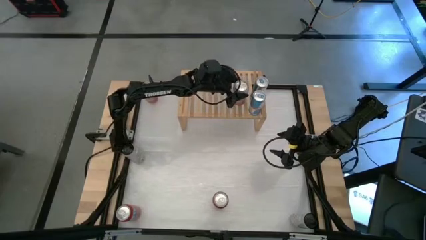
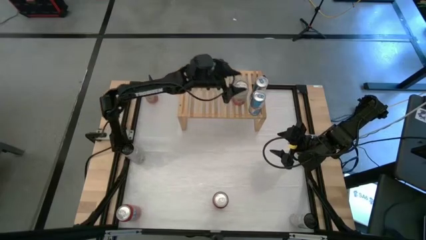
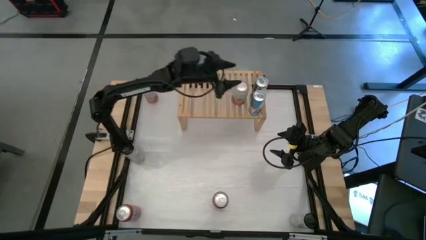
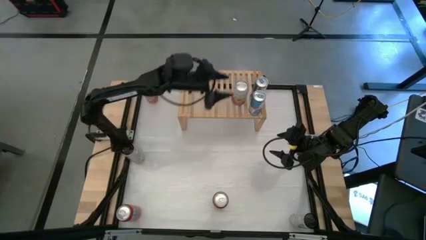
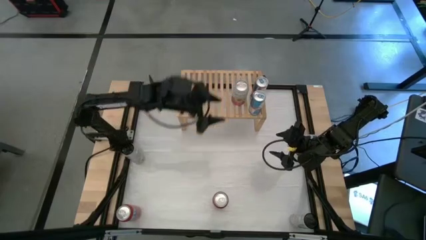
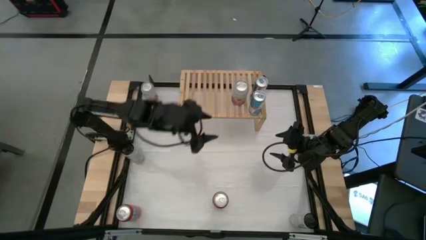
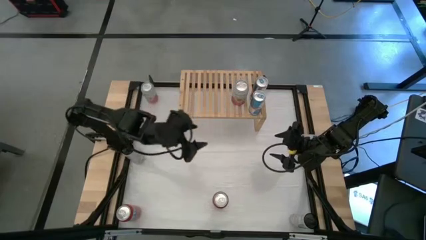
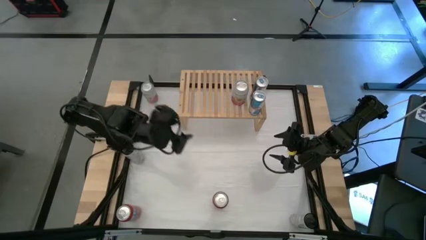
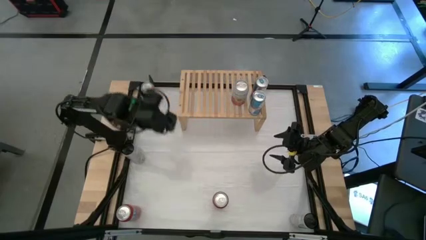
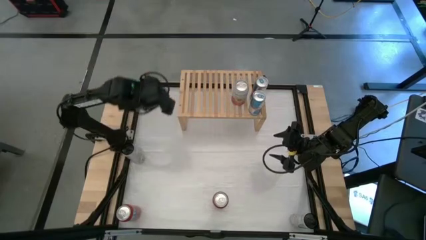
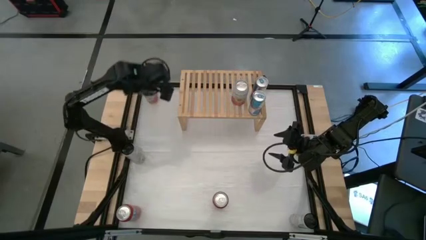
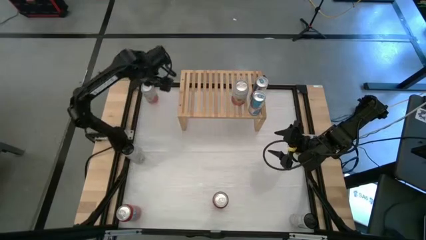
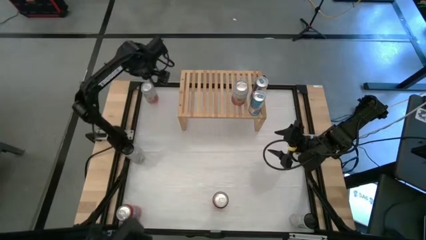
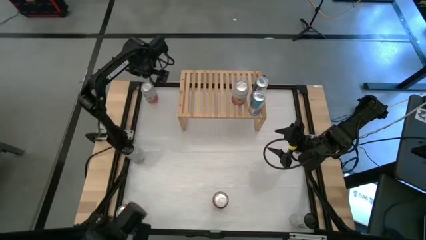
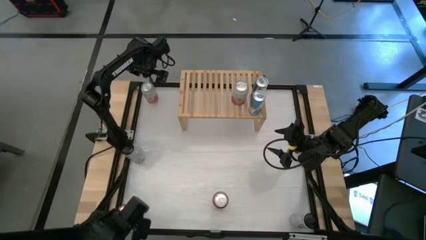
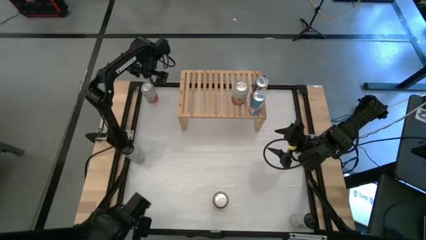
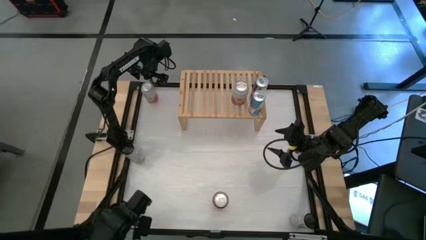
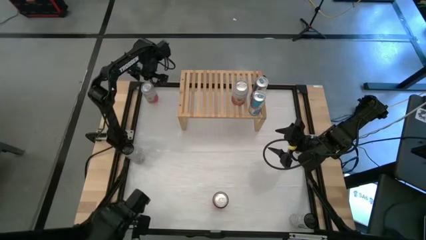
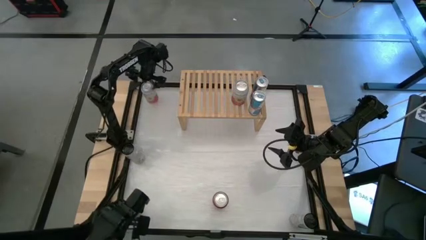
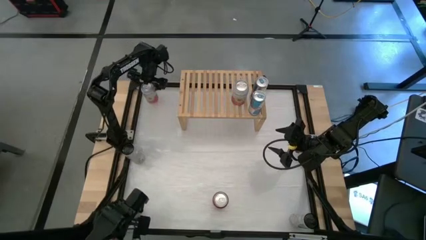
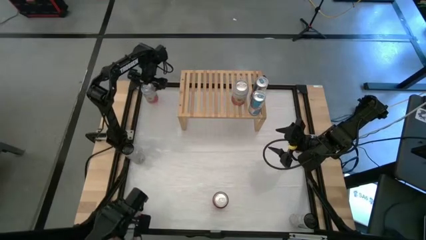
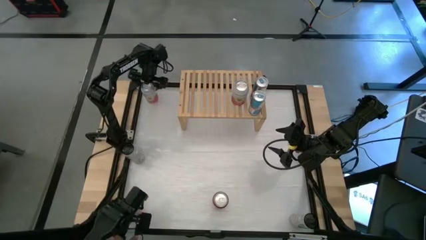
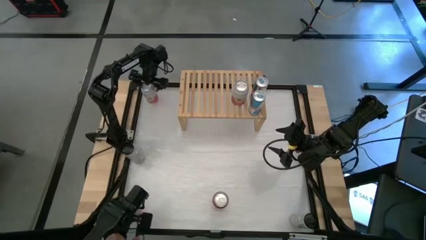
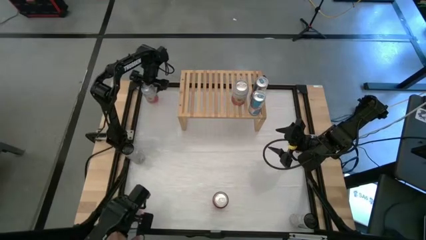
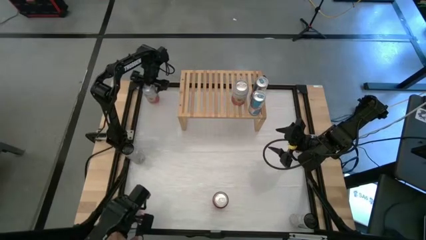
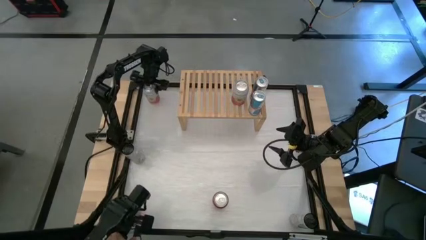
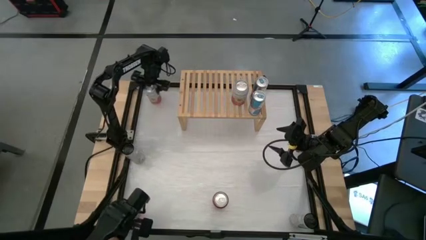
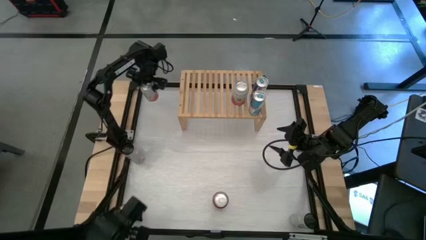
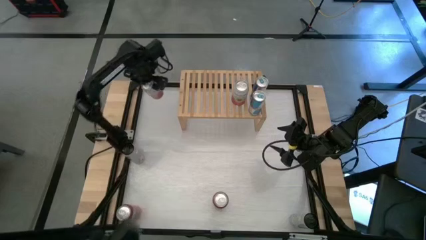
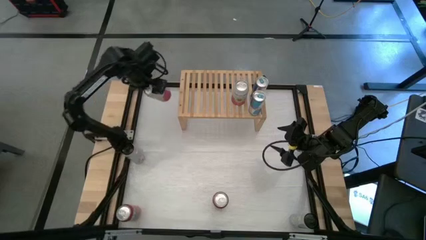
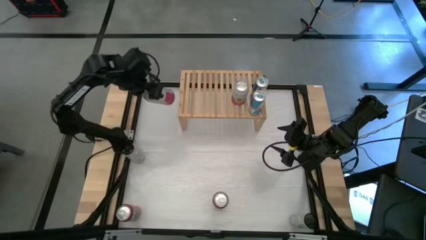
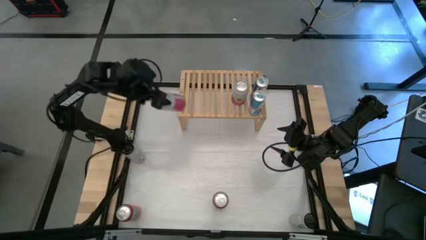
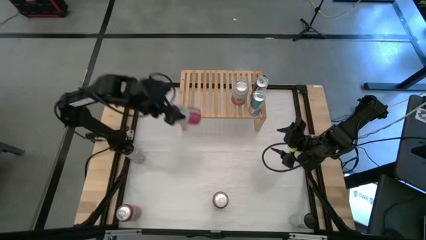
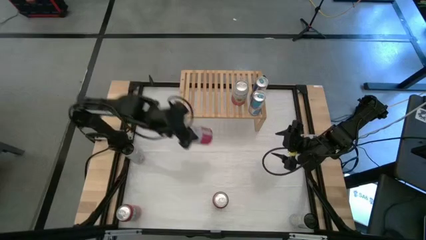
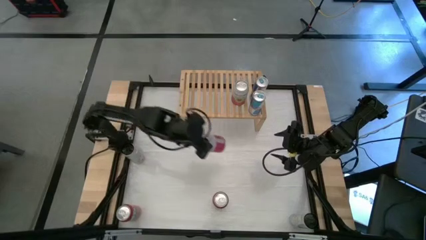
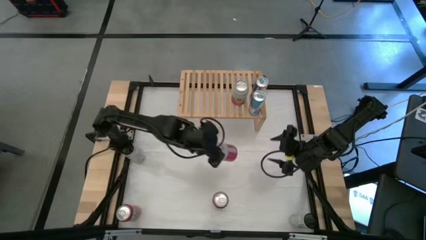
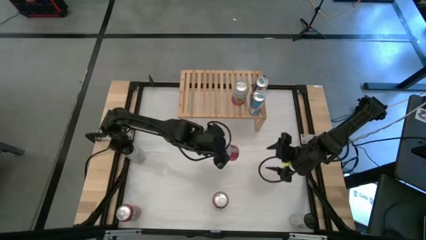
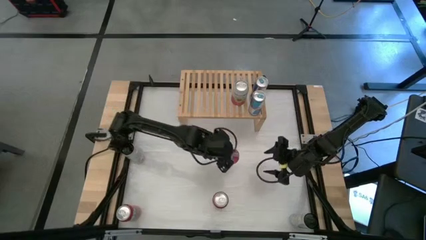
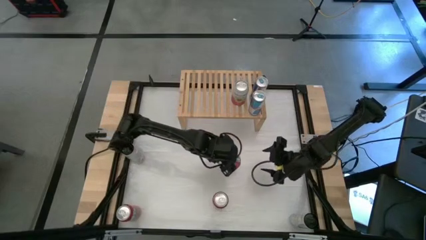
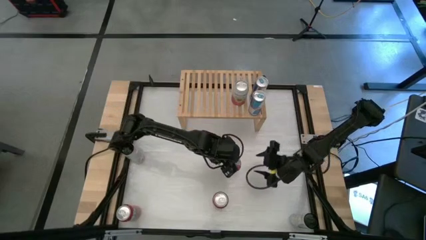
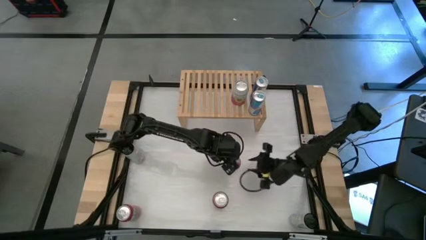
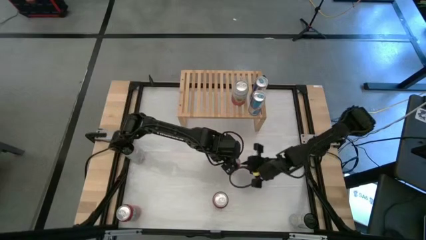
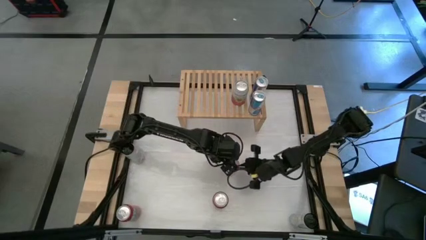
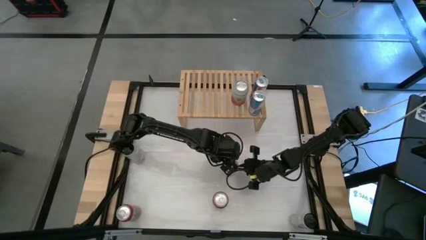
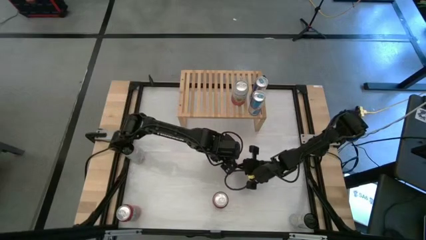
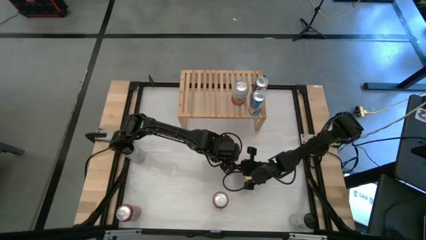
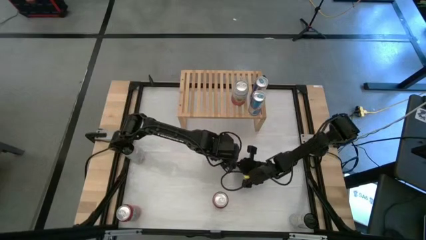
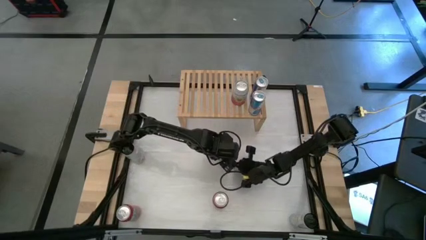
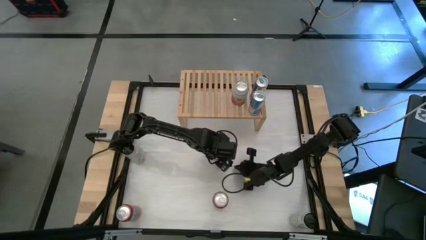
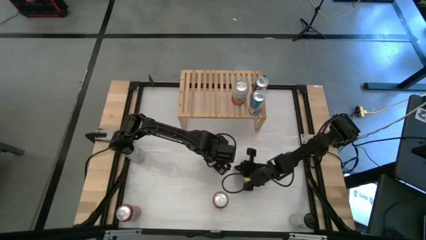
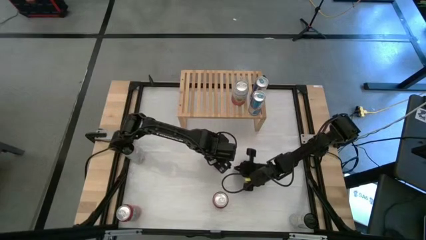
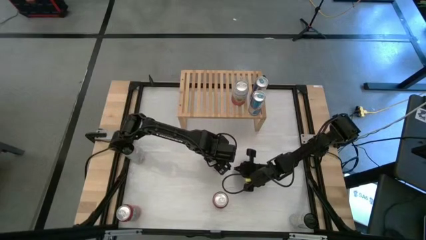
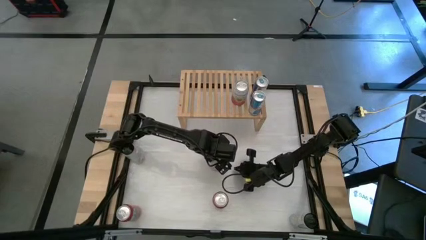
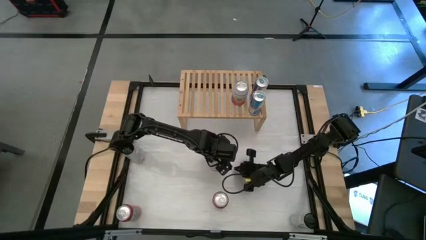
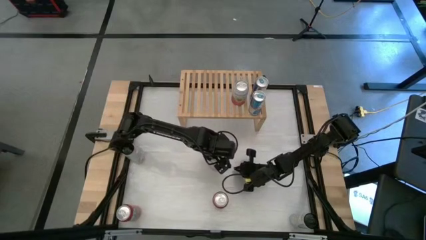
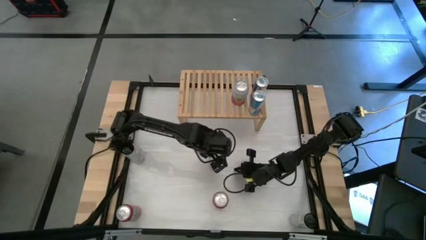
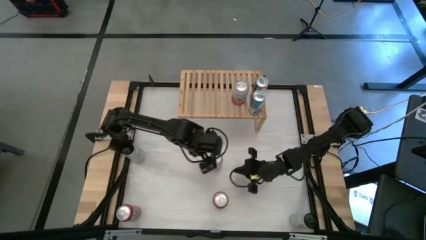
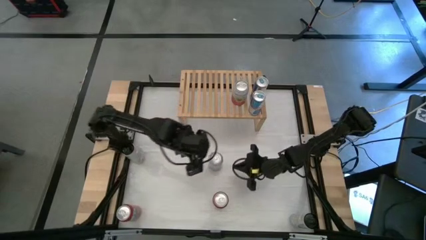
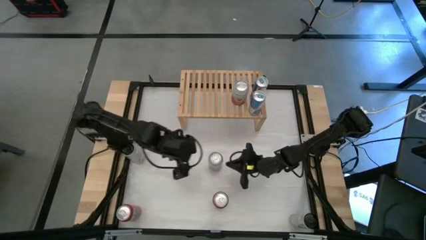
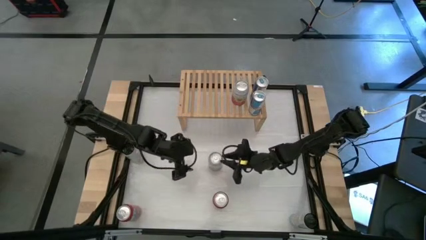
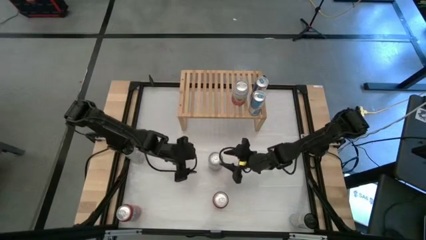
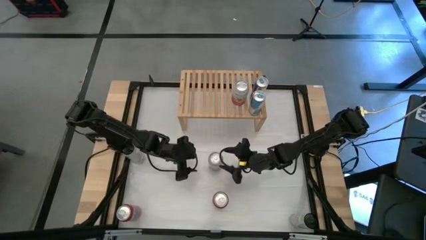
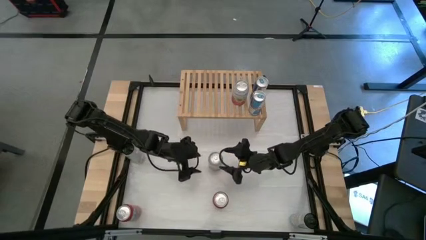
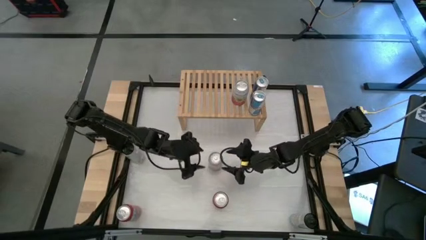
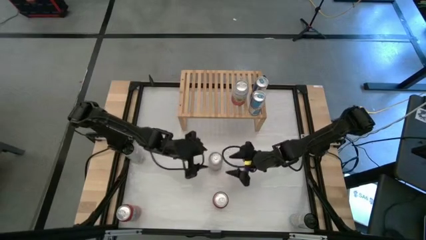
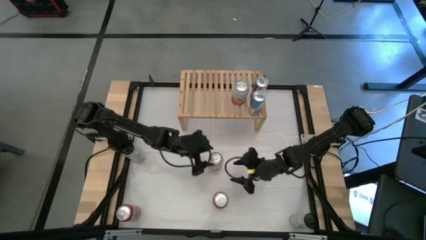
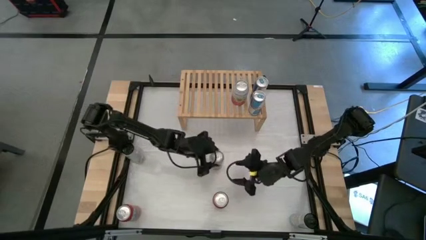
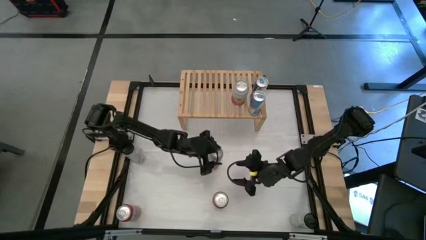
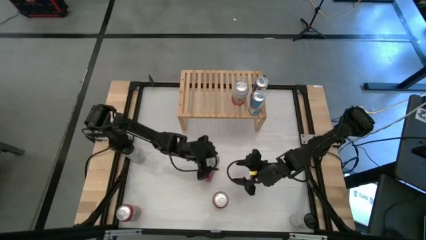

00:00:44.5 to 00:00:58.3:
Task: Place canned beverage on shelf
Put the pink soda can on the shelf aligned with the other pink soda can

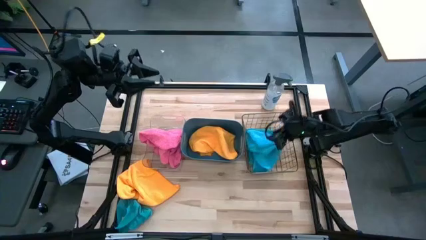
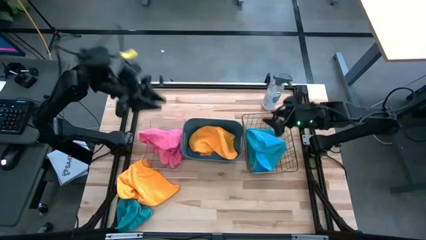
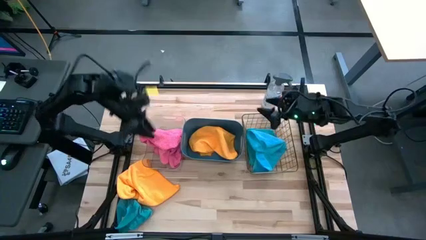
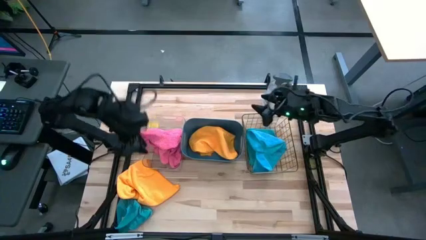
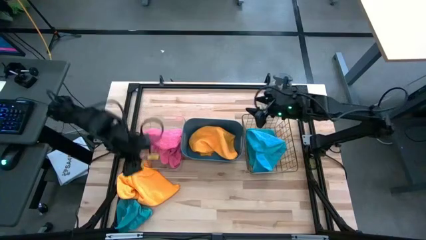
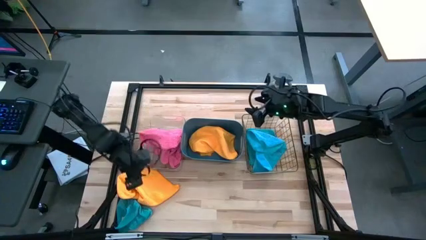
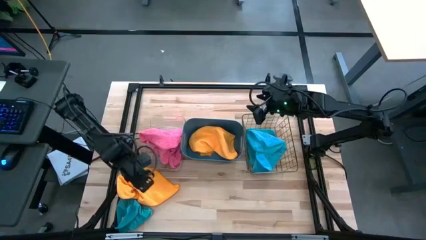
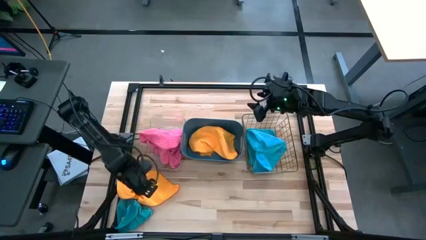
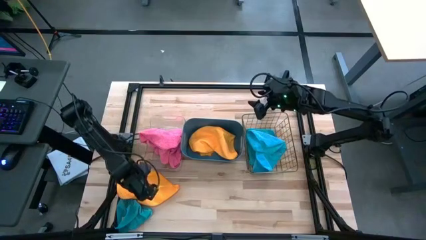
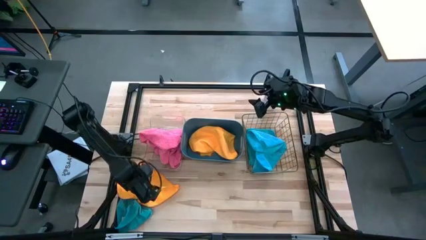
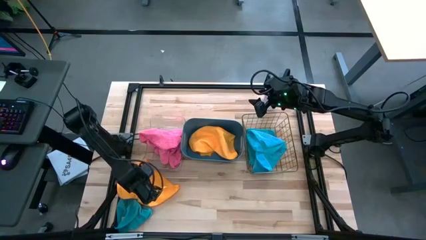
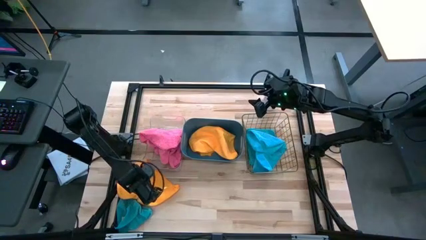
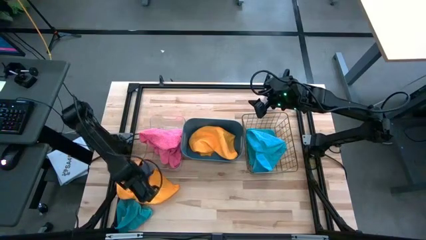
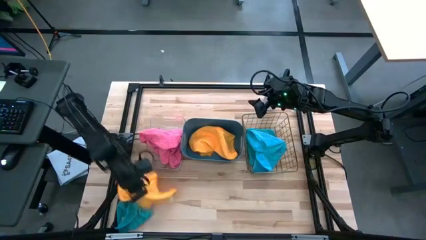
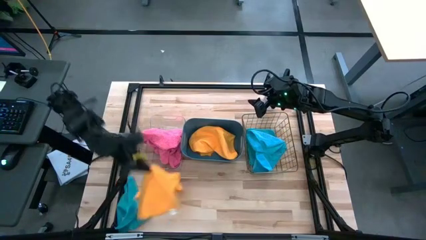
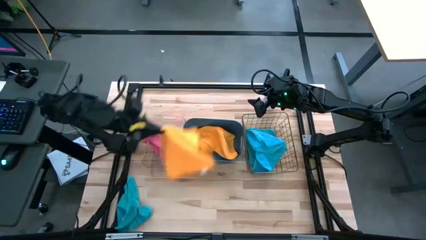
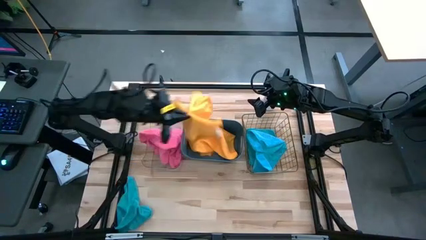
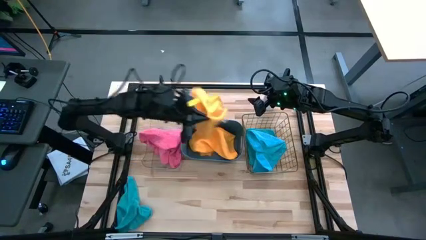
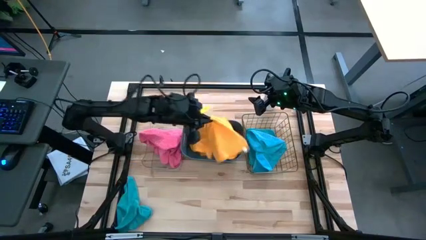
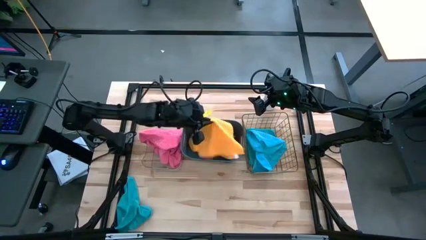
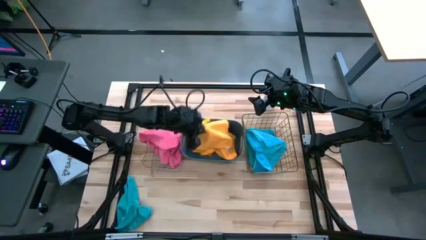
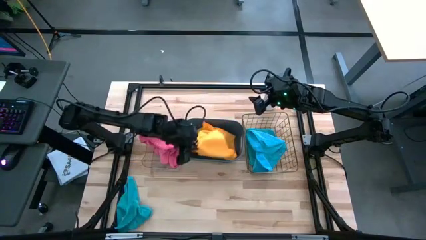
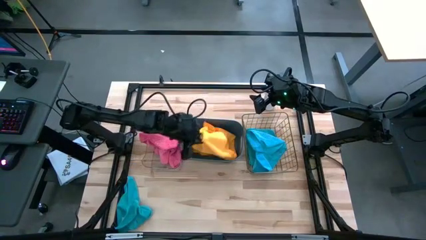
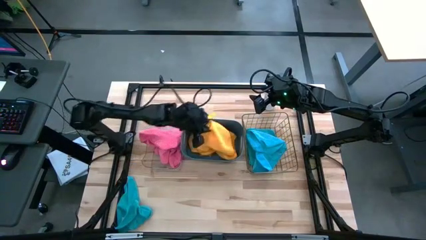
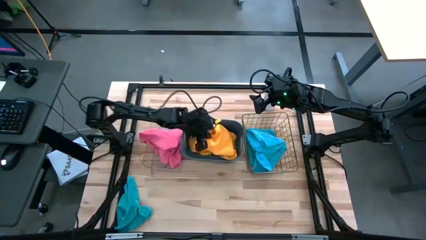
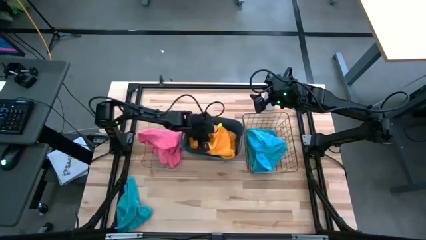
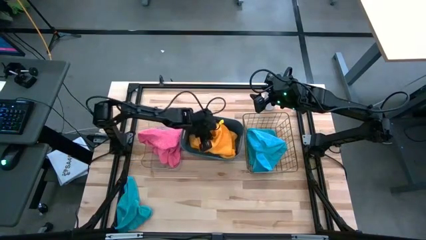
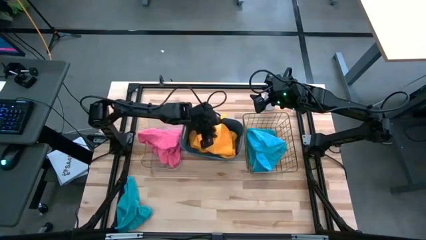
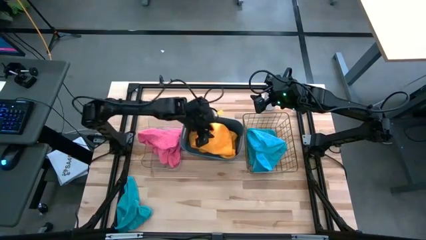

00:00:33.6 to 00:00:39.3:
Task: Sort microfiber towel by color & place in baskets
Put the yellow microfiber cloth into the blue bin
